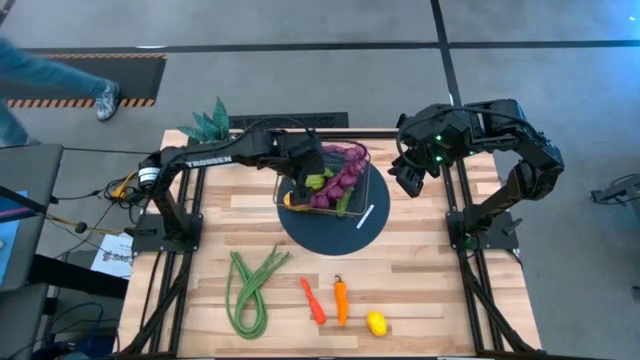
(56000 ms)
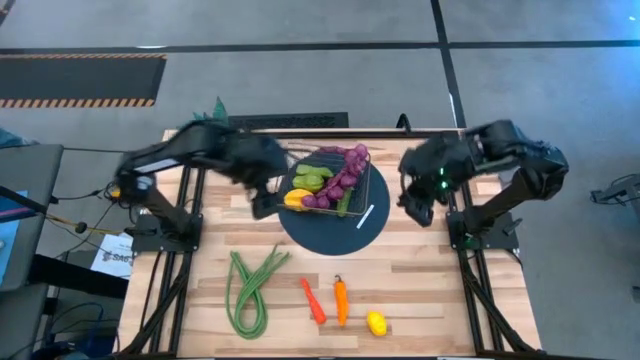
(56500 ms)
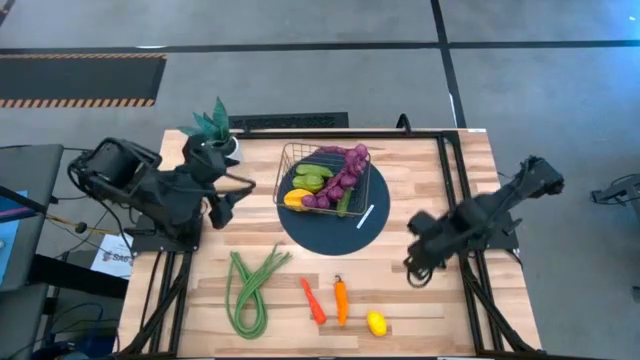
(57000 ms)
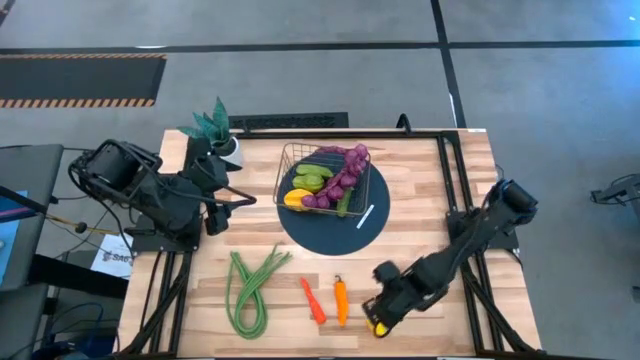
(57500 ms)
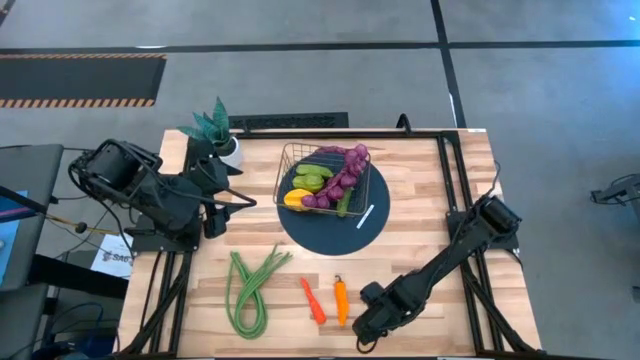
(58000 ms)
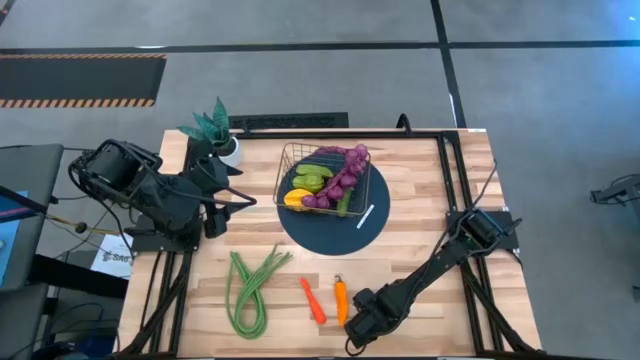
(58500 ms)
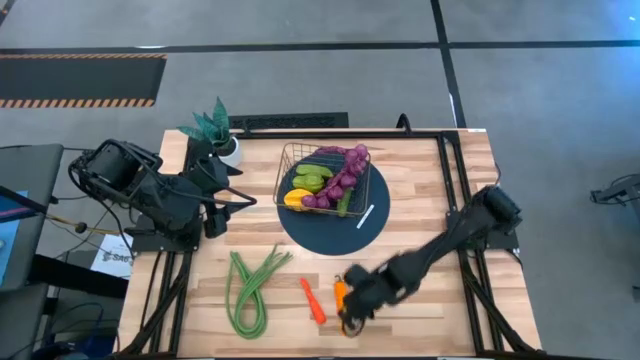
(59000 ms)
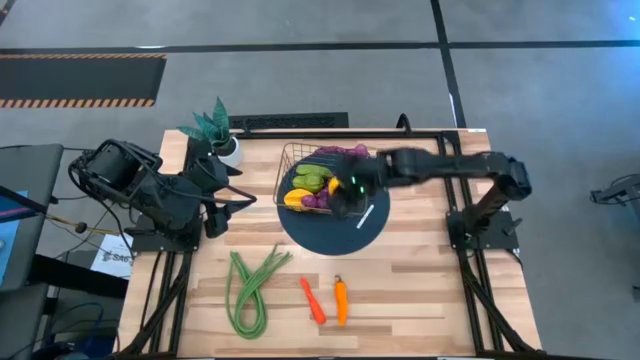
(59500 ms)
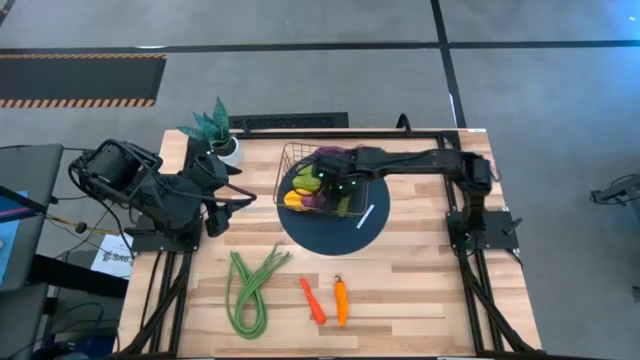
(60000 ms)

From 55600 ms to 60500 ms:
Task: Build produce basket
Put the yellow lemon into the wire basket

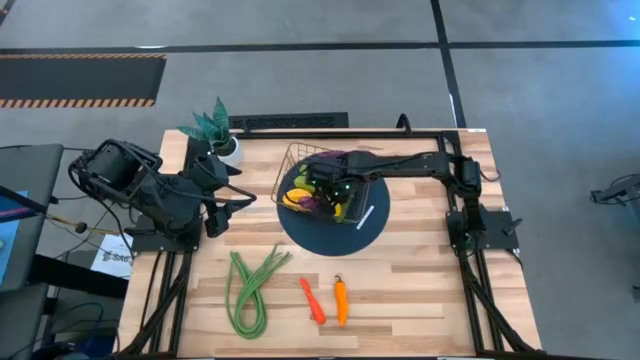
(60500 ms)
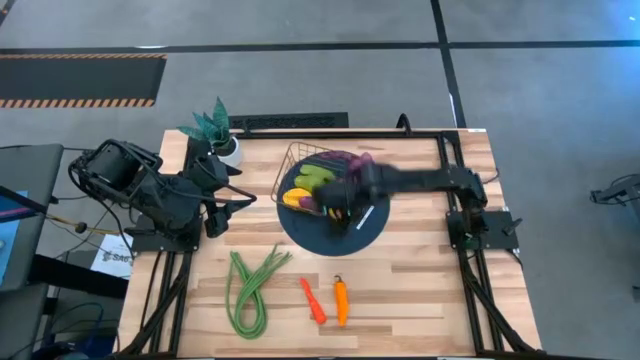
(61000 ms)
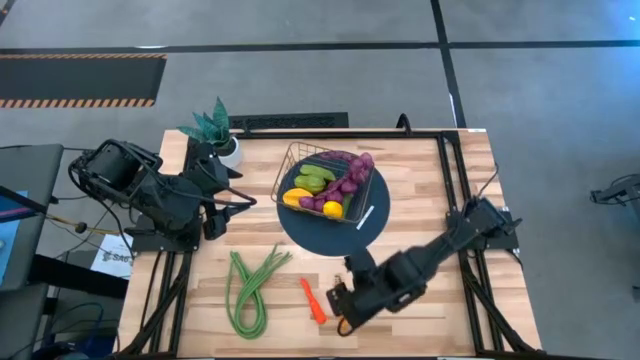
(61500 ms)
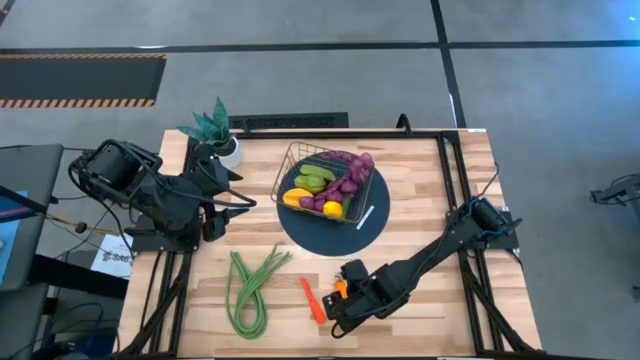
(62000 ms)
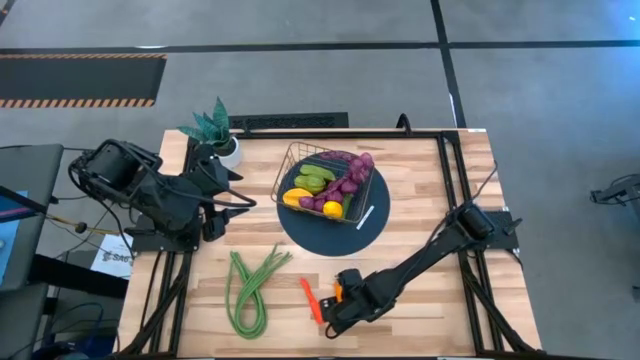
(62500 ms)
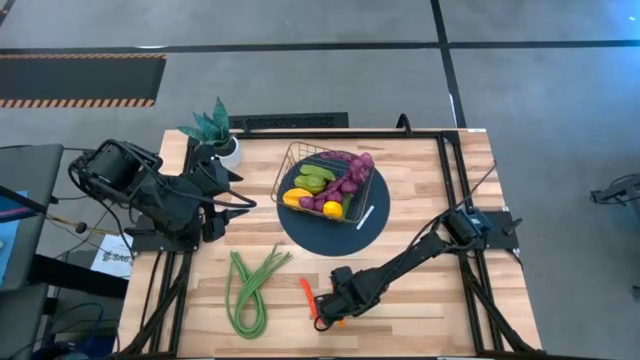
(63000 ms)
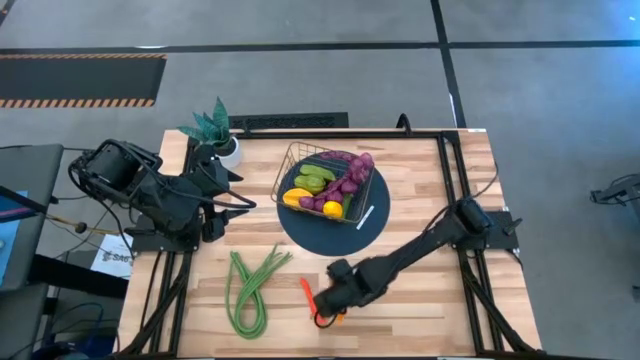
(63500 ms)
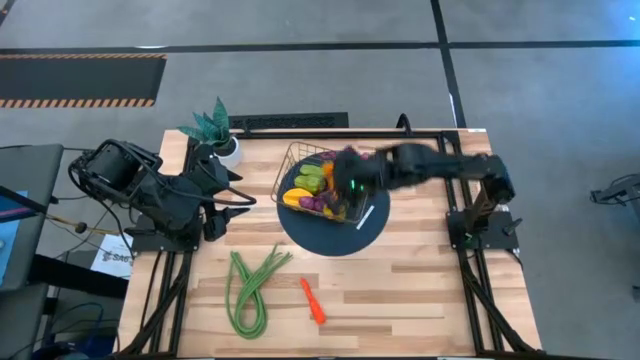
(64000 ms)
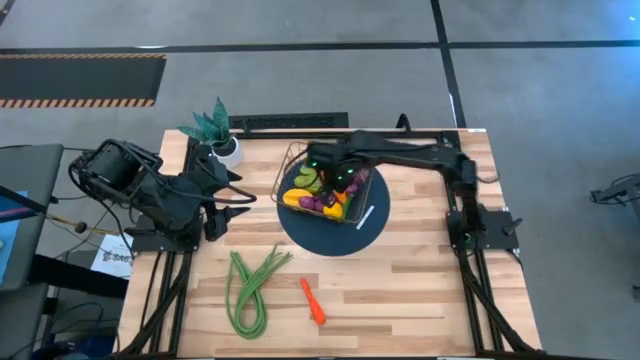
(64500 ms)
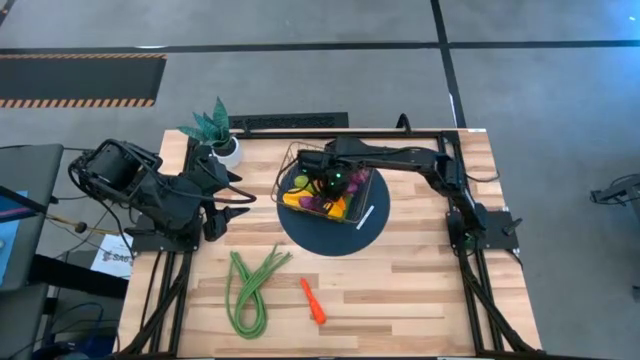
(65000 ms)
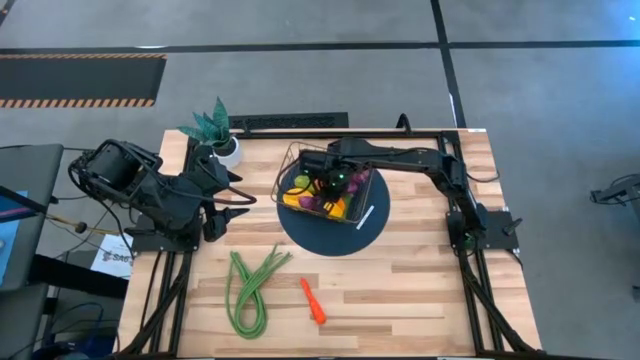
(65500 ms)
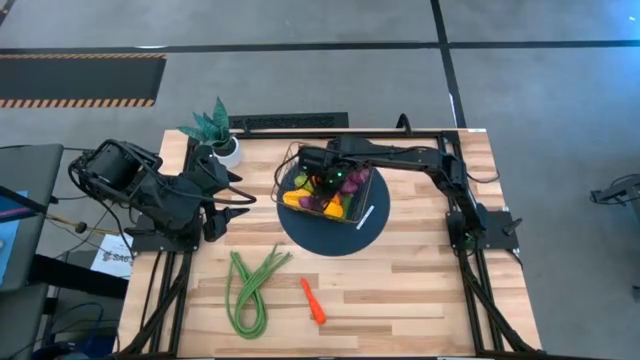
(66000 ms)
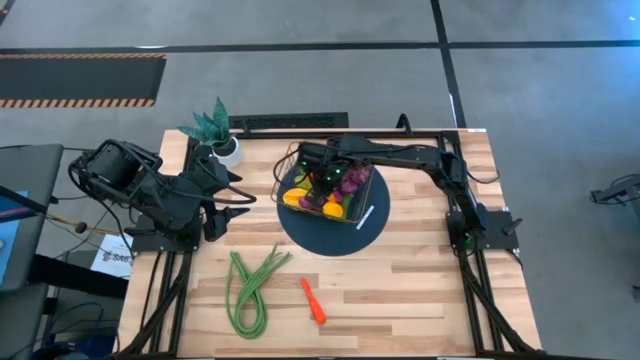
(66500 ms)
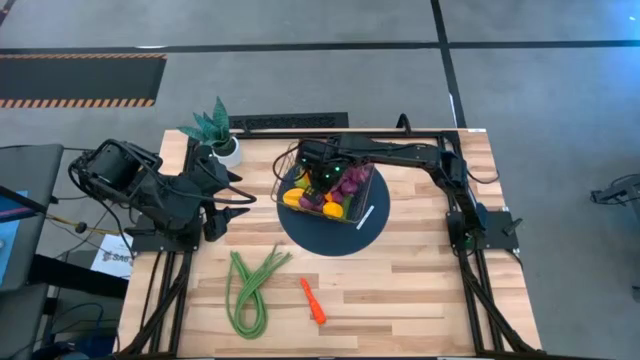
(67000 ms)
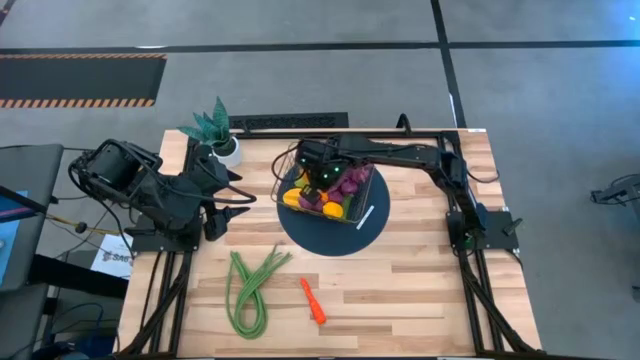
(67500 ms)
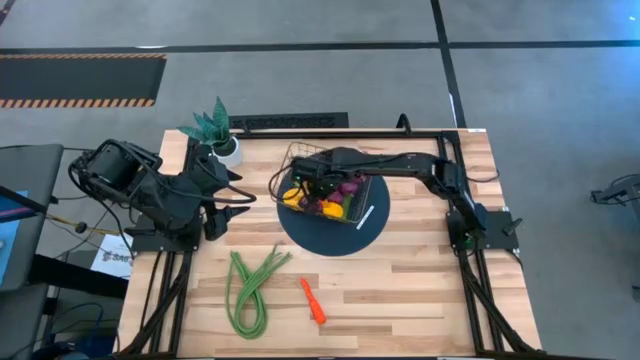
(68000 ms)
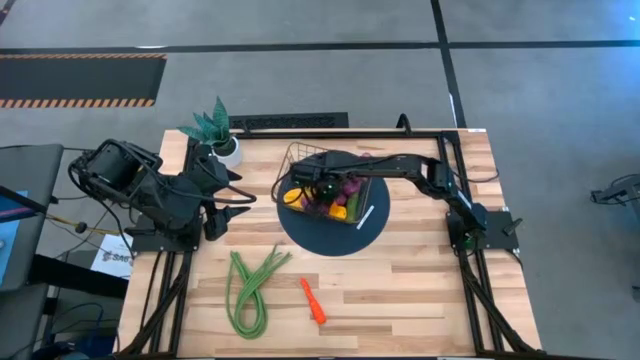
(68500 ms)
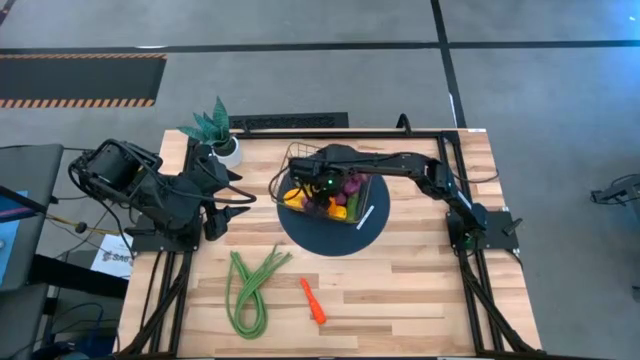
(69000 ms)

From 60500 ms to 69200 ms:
Put the yellow chili pepper into the wire basket

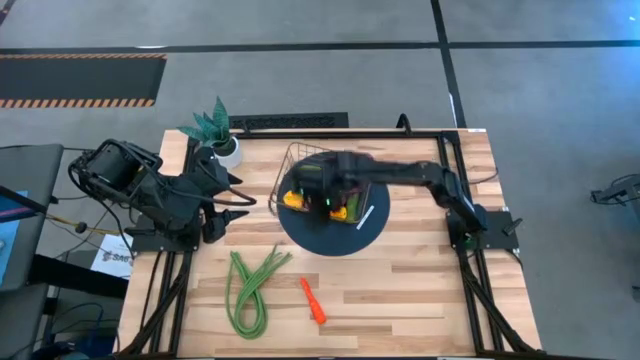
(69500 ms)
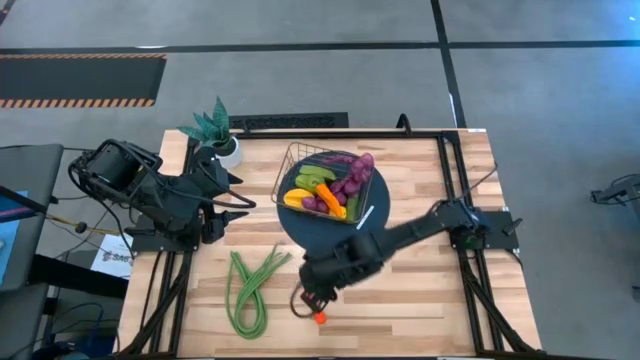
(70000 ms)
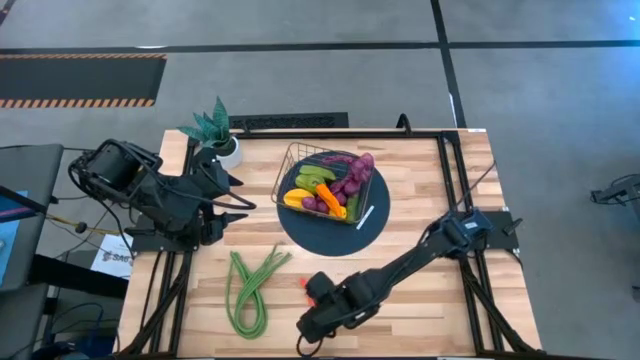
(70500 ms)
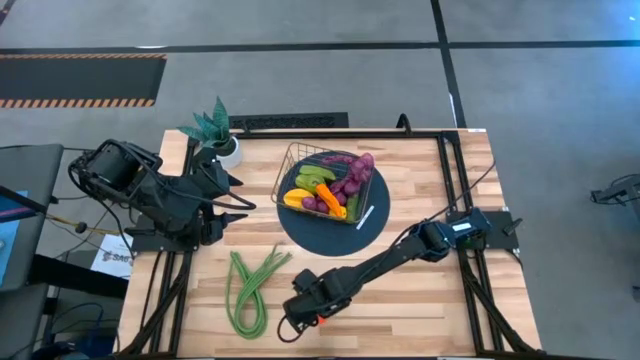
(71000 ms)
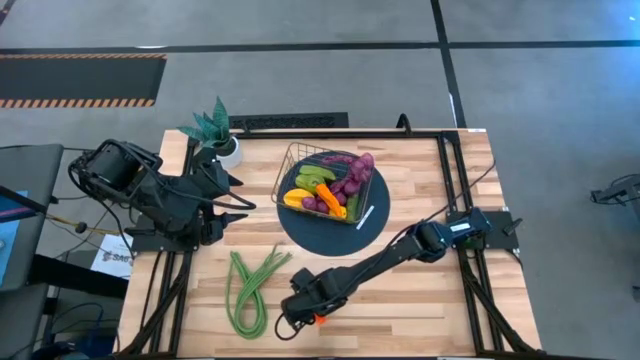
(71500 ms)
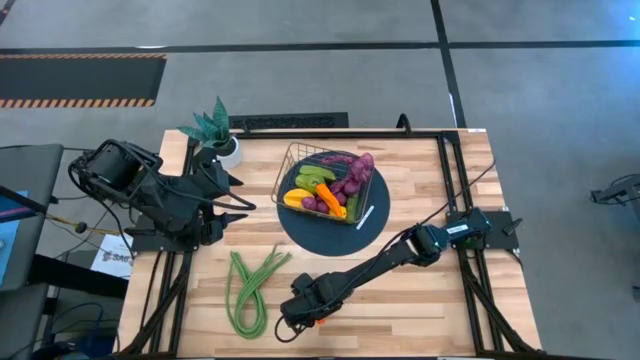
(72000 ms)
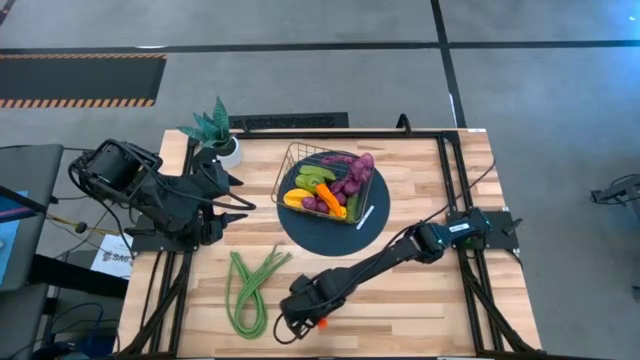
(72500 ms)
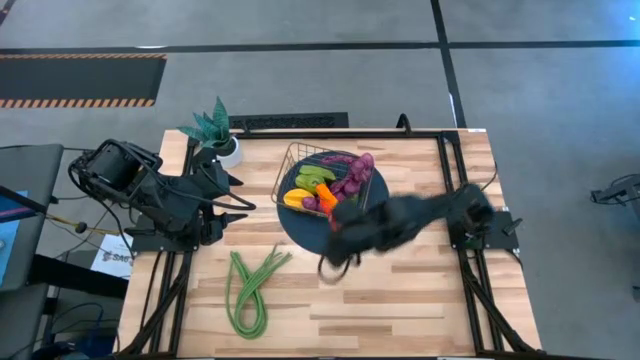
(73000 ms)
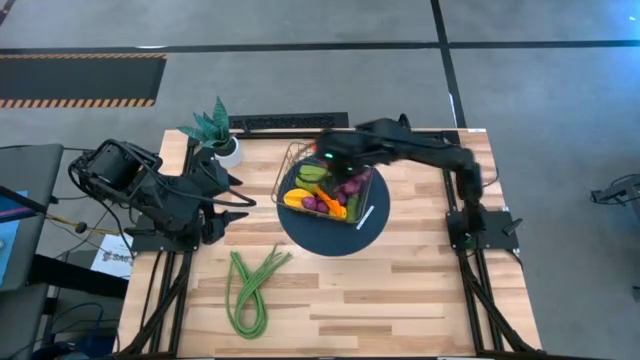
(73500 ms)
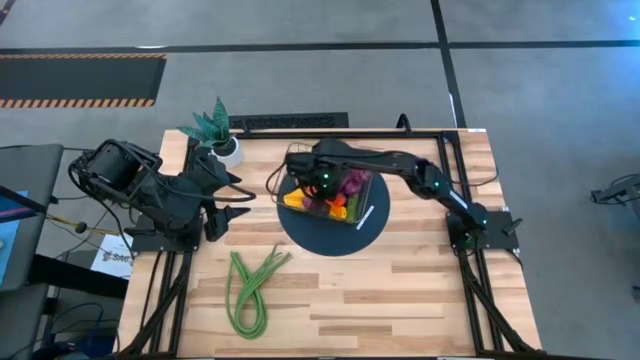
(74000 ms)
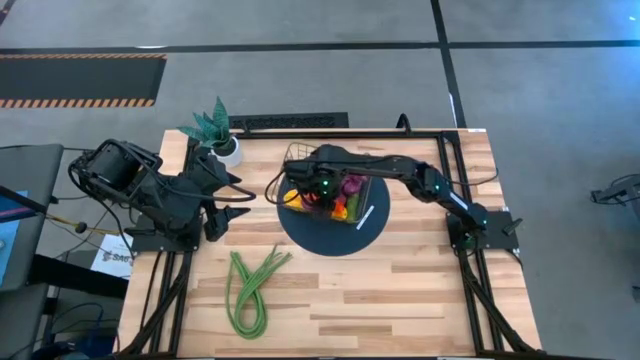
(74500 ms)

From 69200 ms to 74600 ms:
Put the orange carrot into the wire basket

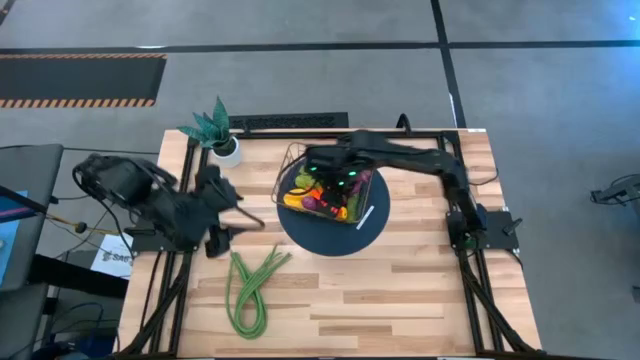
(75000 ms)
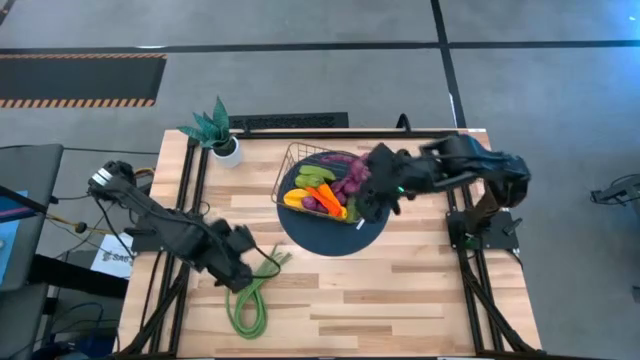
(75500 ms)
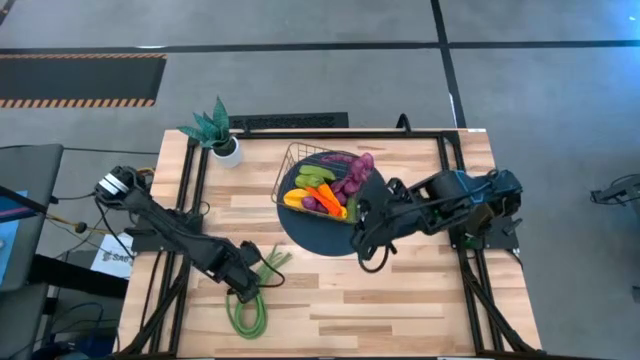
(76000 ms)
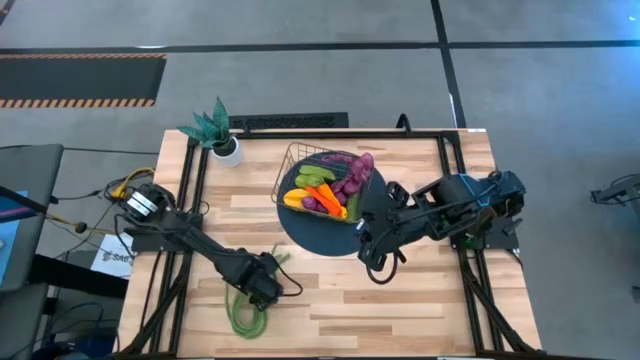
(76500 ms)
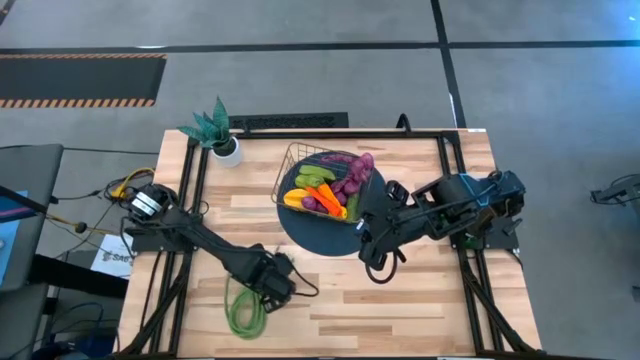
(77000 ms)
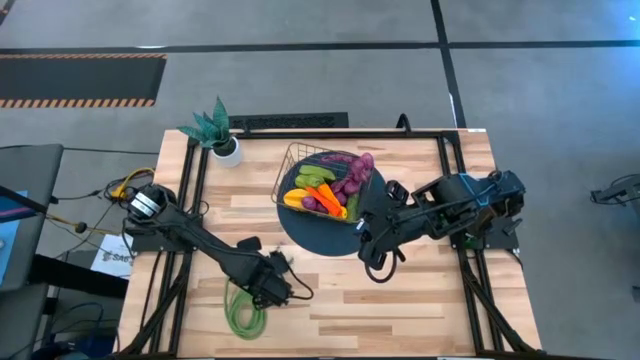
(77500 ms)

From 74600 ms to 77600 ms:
Put the green beans into the wire basket
